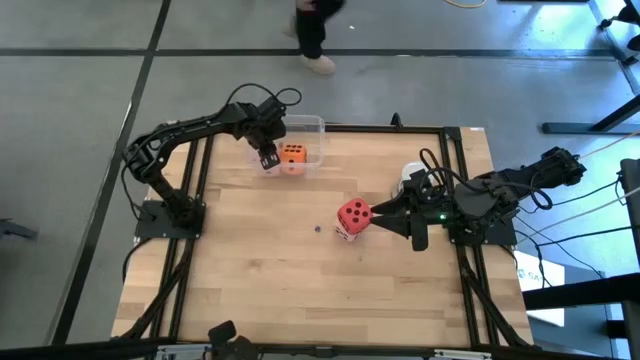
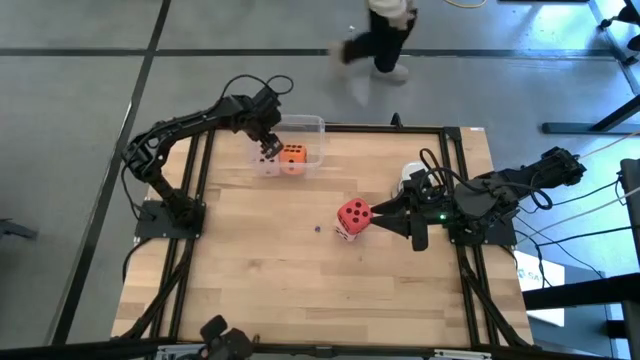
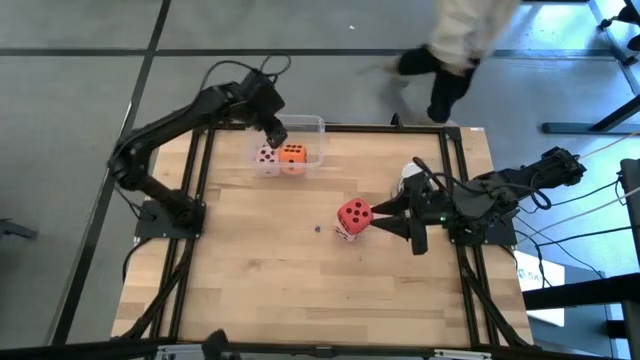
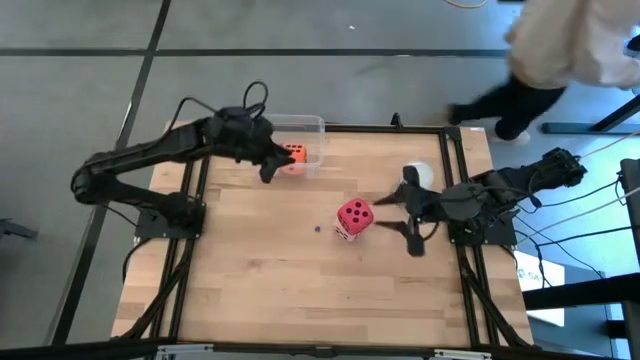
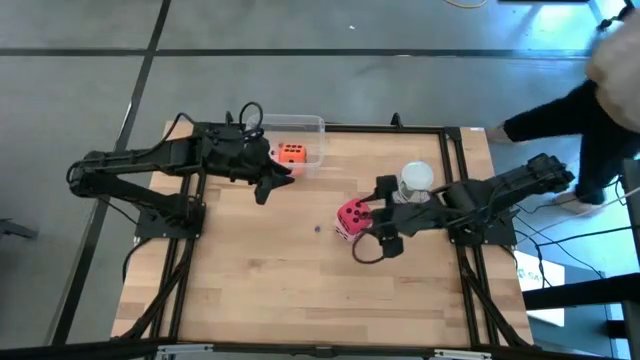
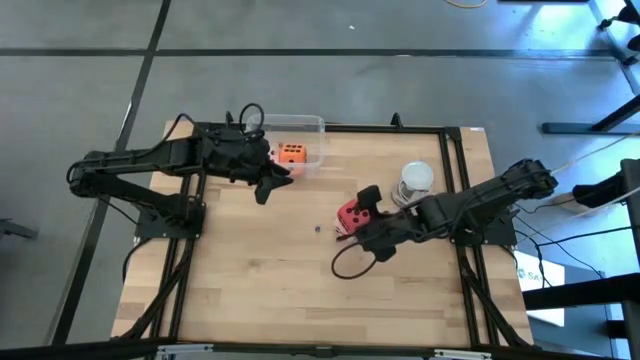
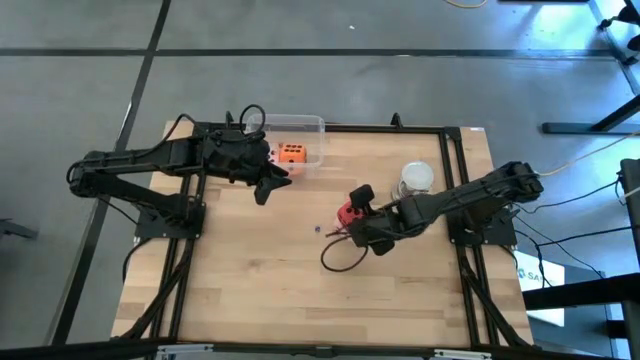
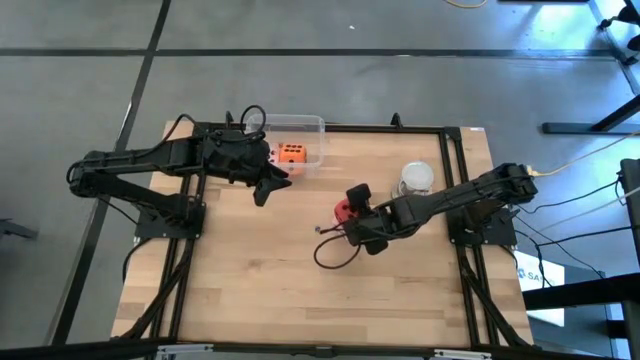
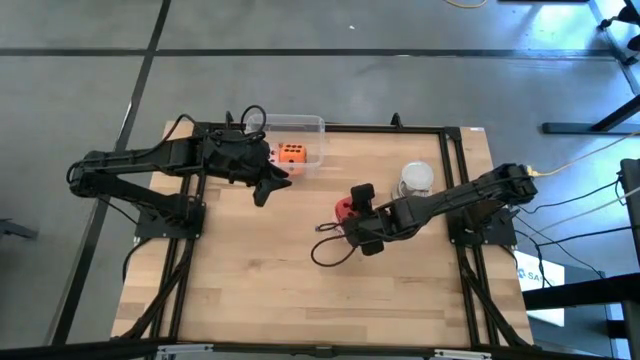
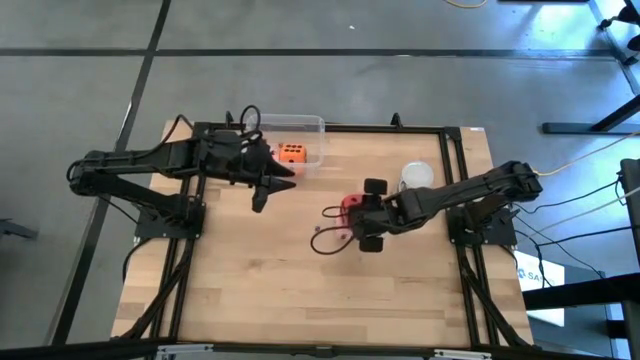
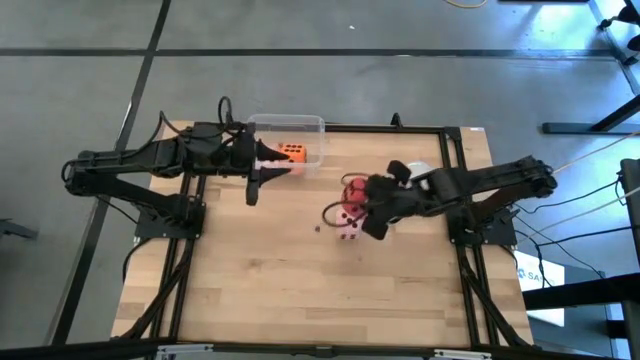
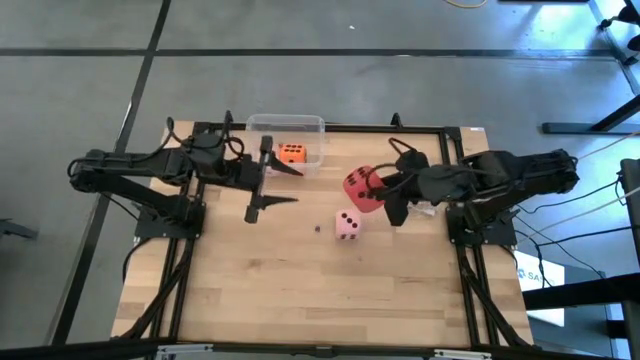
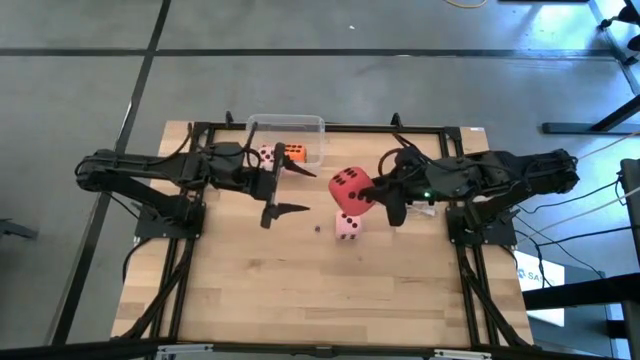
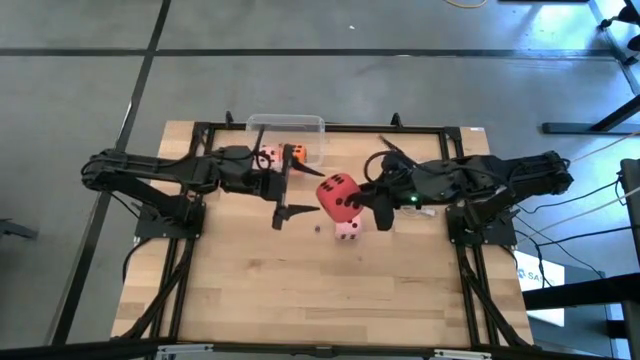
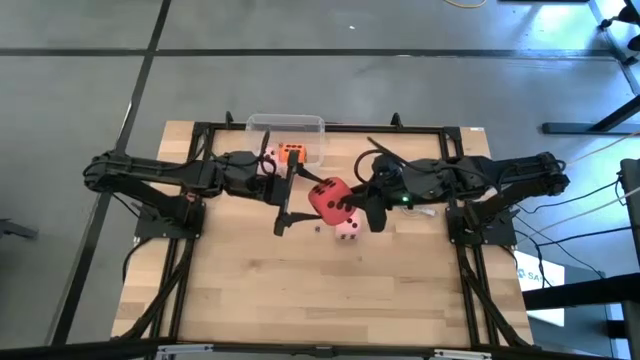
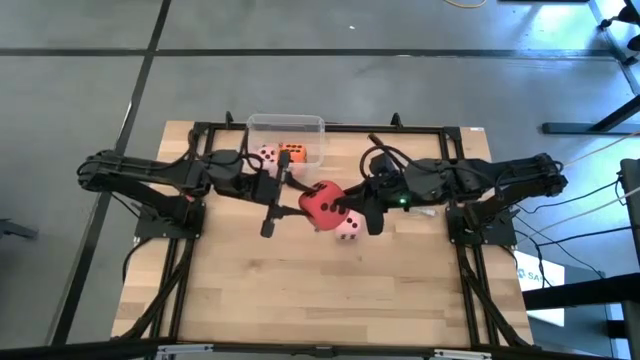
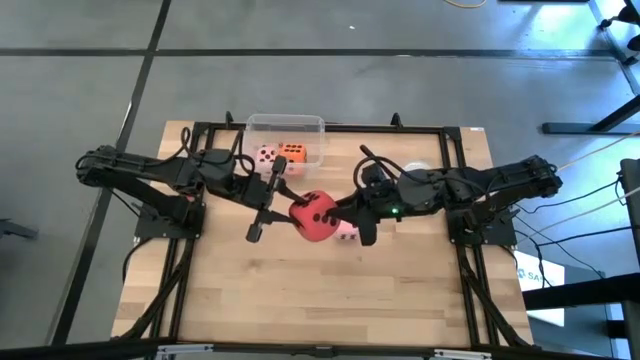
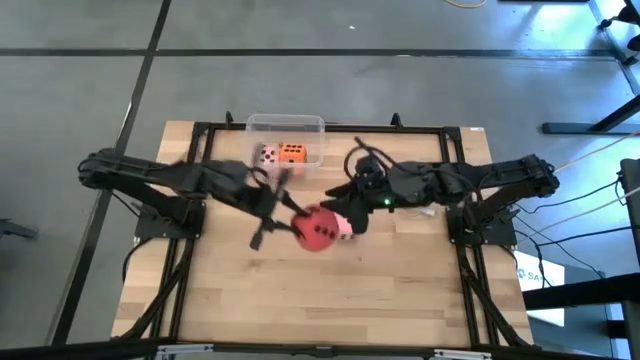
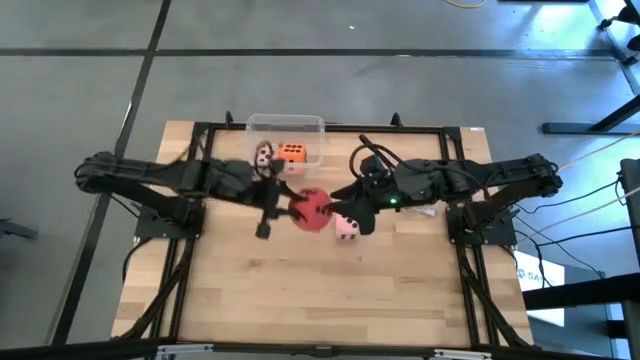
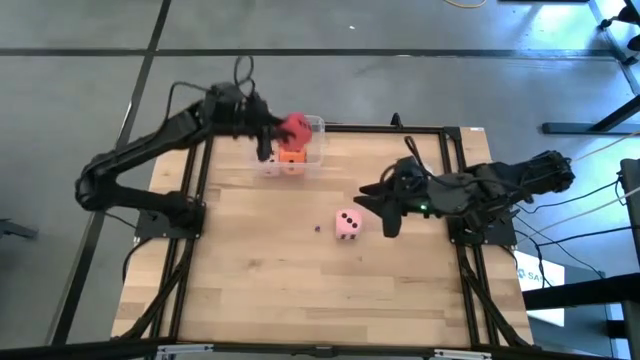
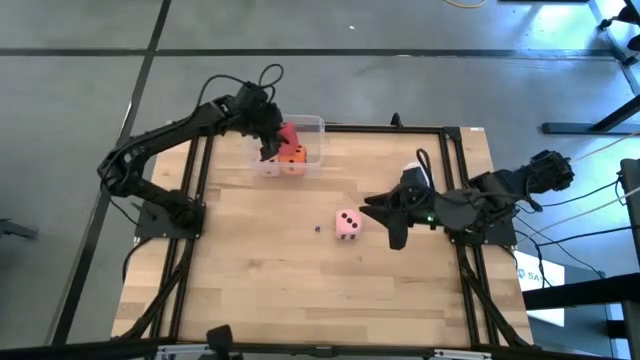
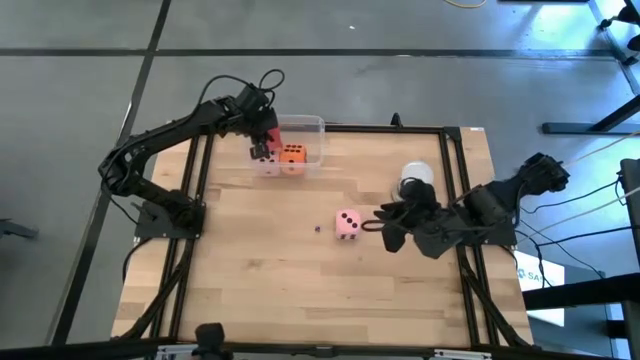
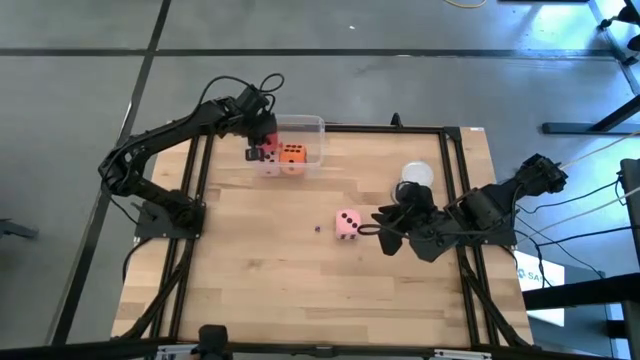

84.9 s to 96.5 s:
Task: Pick & Place Dice
Put the large red dice into the transparent bin

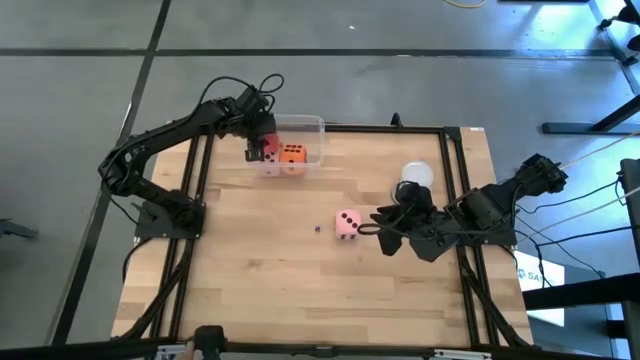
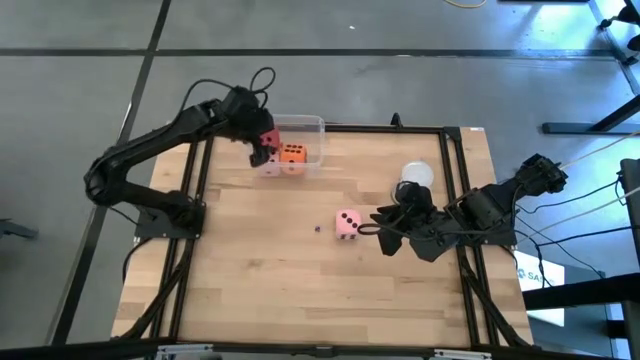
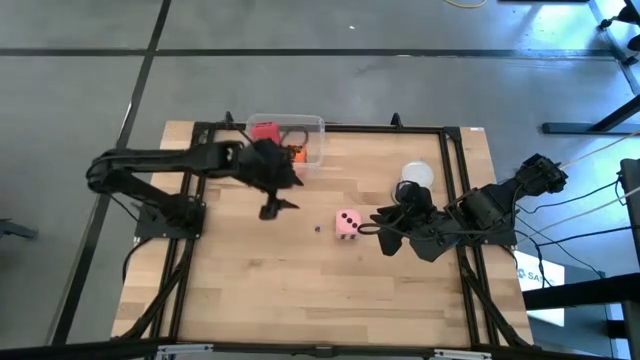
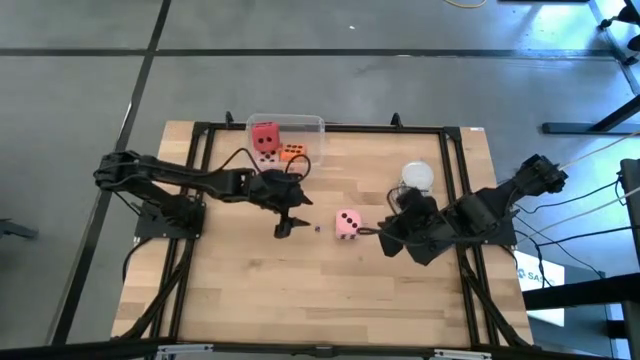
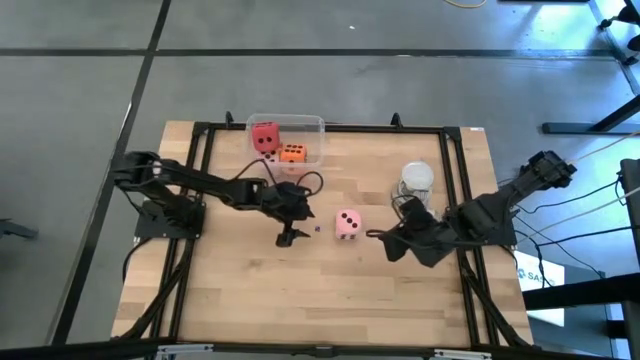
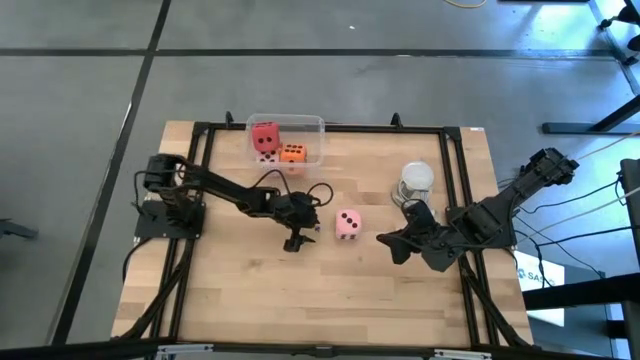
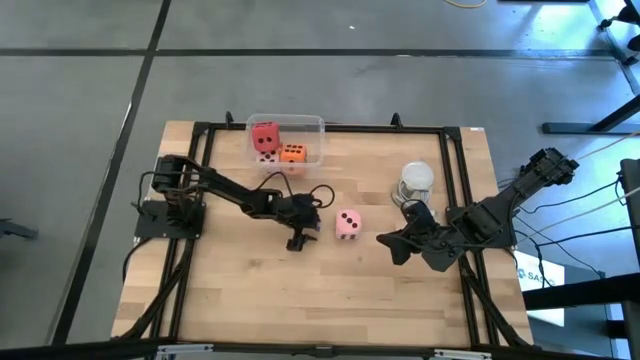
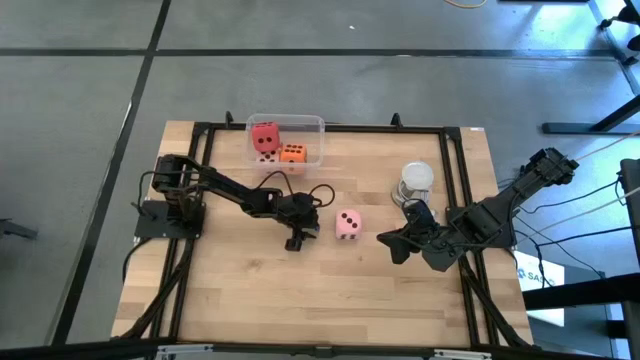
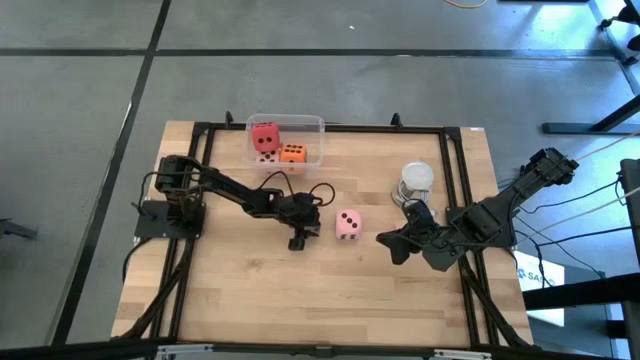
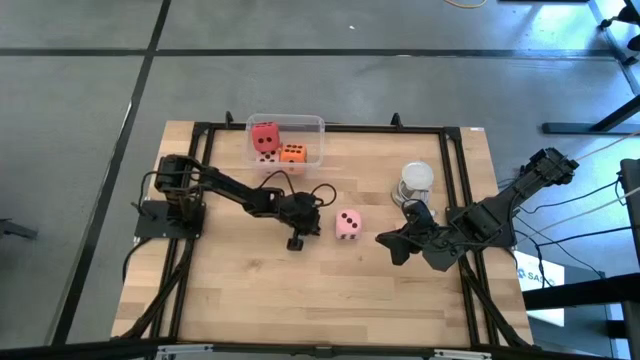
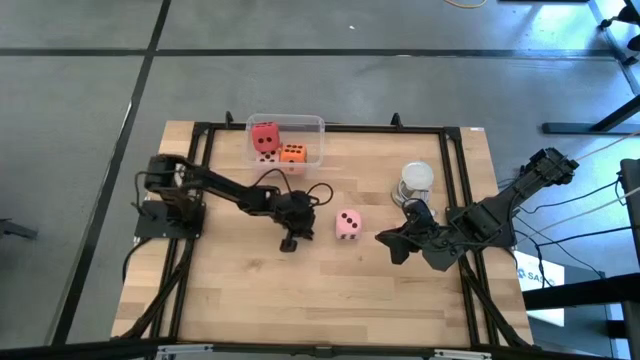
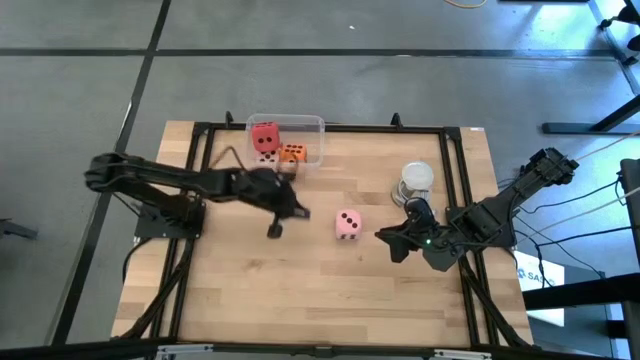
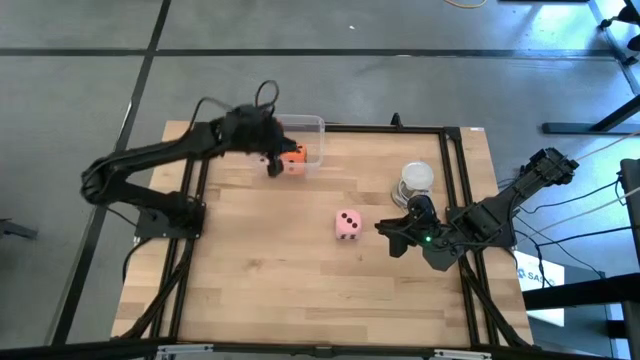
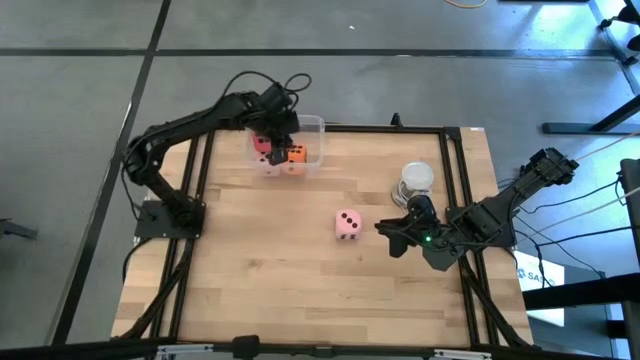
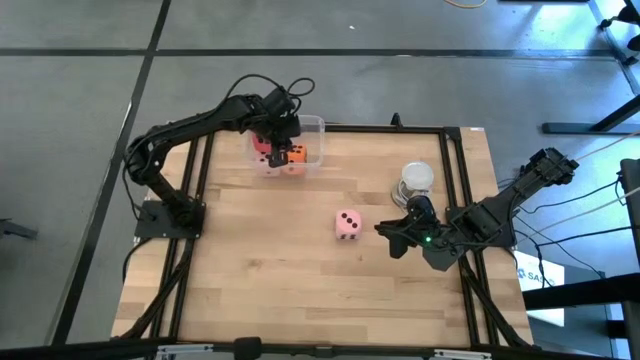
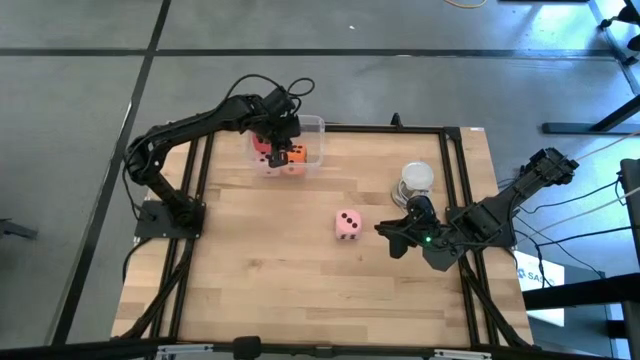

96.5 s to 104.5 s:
Put the small blue dice into the transparent bin

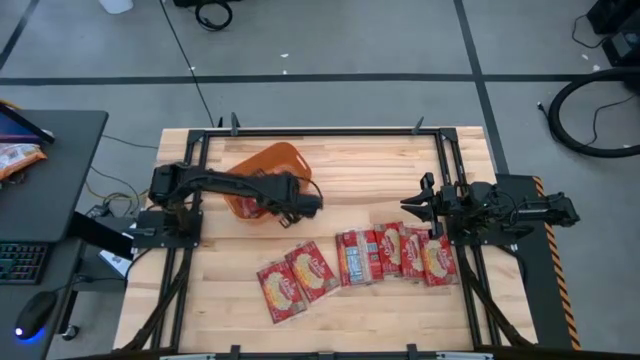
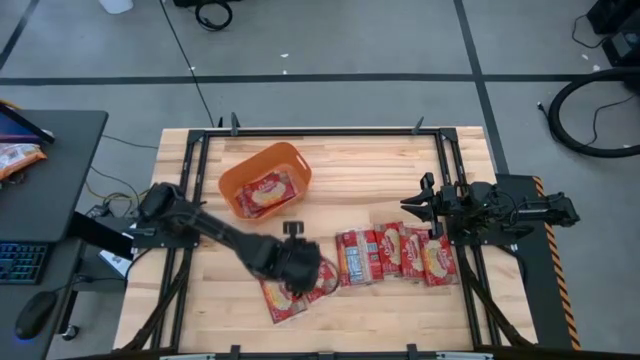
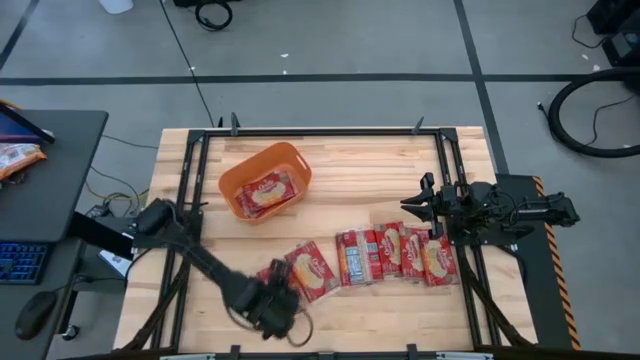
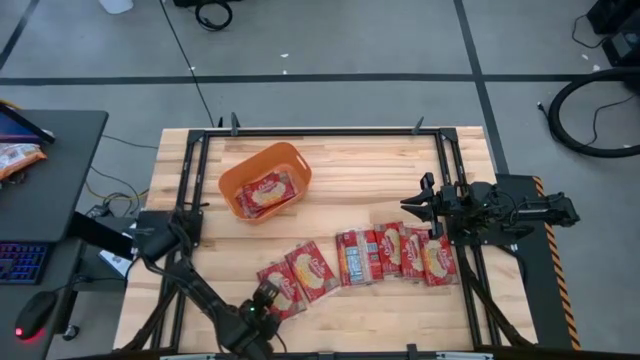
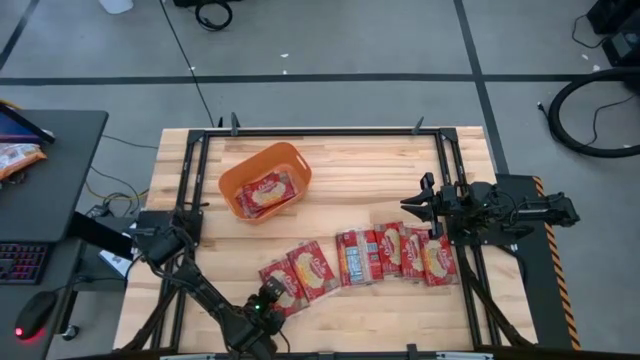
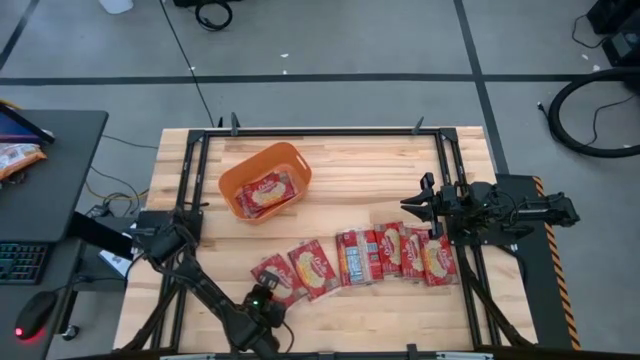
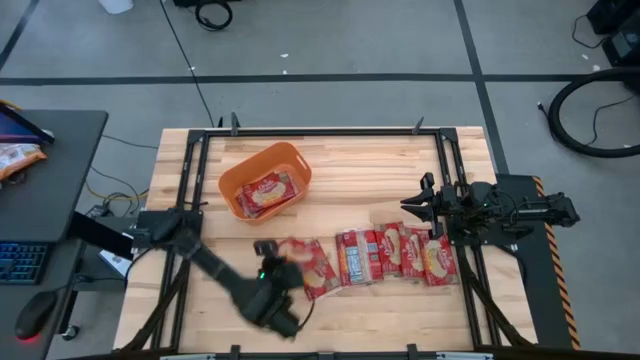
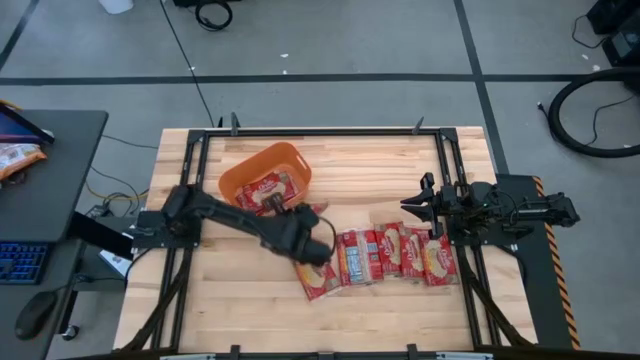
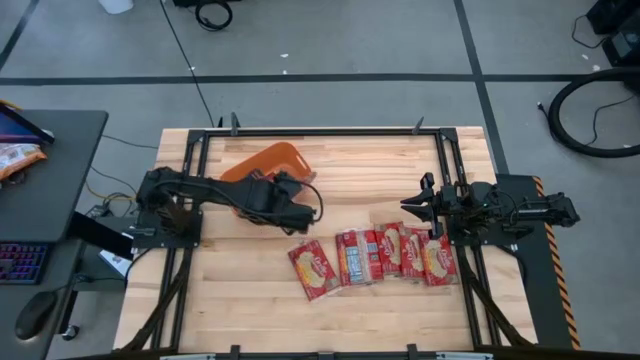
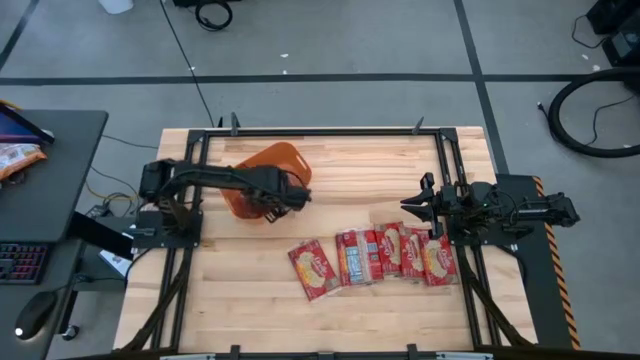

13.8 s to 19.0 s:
Task: Sort popcorn bags into baskets
Put the popcorn bag into the orange bin
